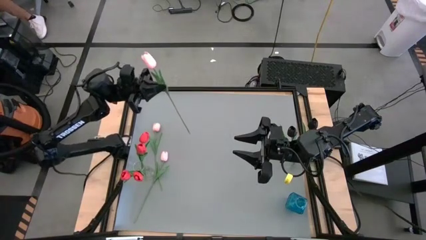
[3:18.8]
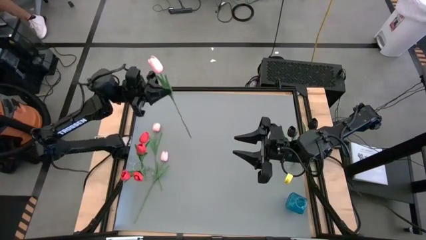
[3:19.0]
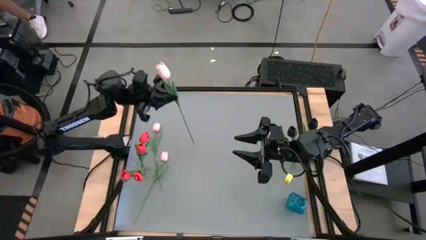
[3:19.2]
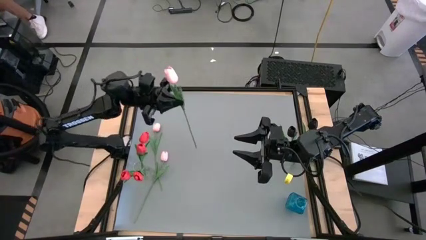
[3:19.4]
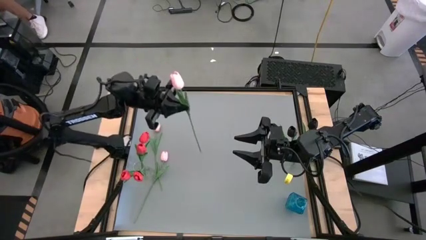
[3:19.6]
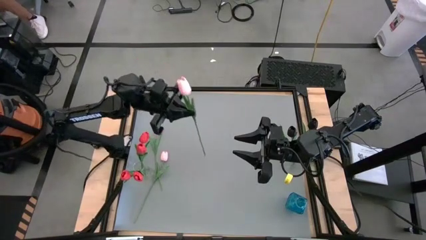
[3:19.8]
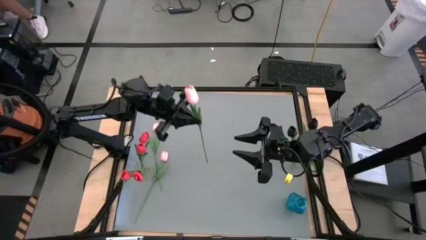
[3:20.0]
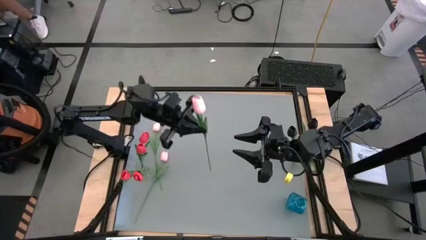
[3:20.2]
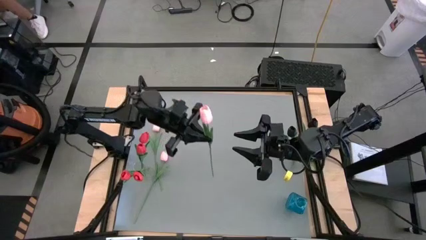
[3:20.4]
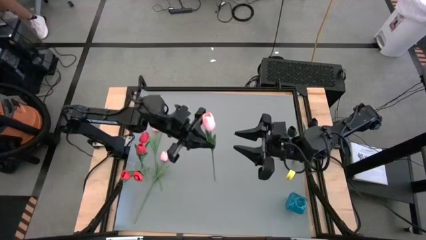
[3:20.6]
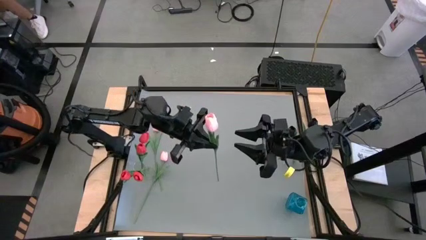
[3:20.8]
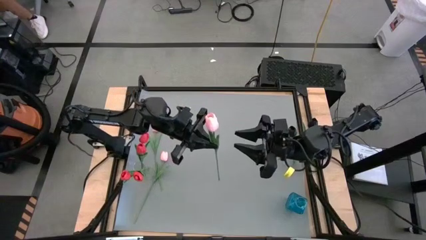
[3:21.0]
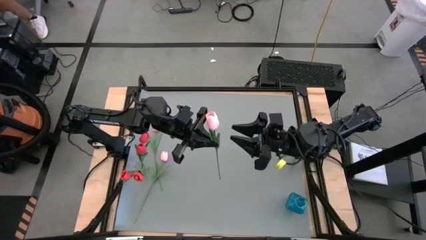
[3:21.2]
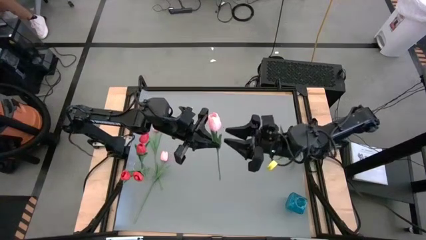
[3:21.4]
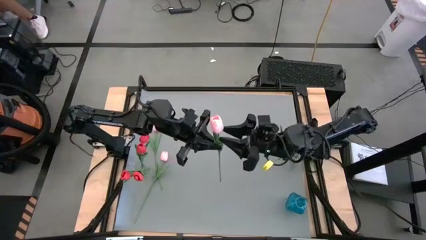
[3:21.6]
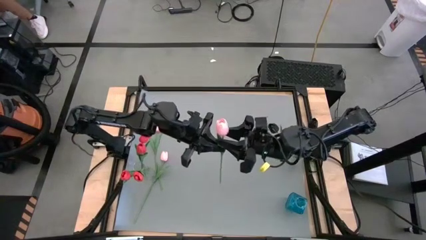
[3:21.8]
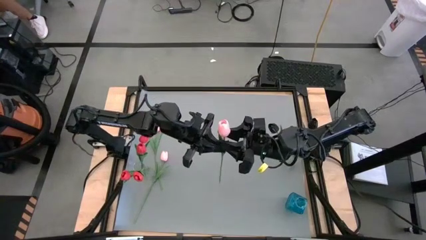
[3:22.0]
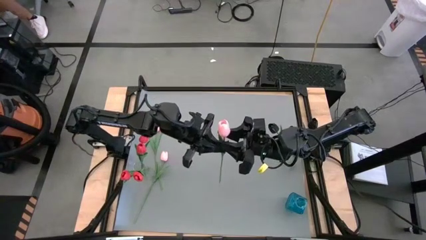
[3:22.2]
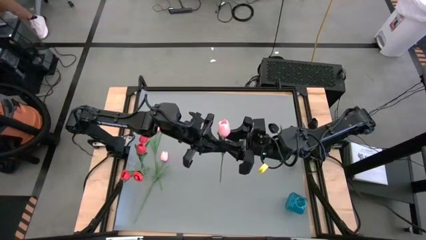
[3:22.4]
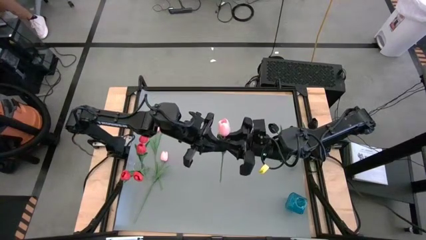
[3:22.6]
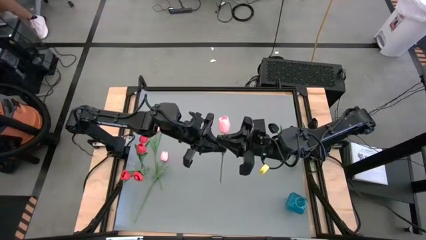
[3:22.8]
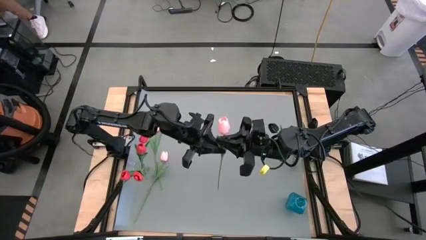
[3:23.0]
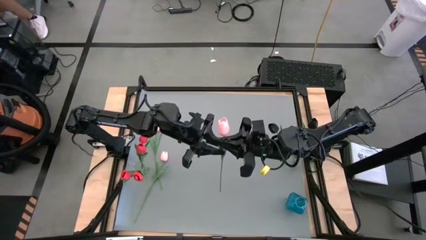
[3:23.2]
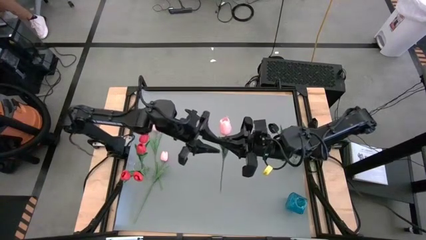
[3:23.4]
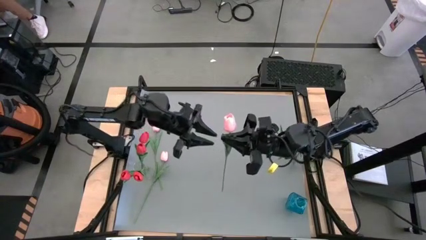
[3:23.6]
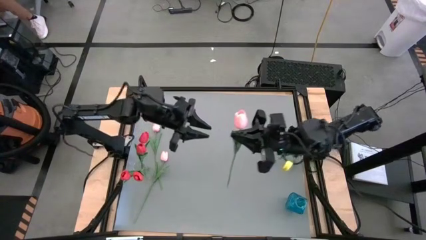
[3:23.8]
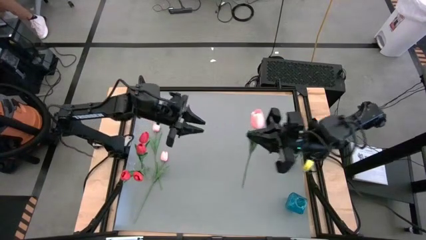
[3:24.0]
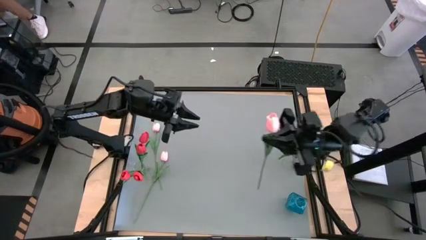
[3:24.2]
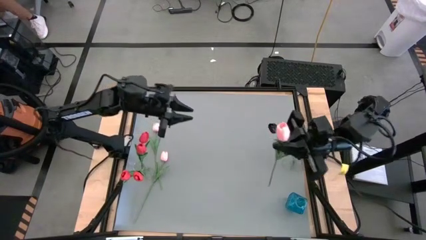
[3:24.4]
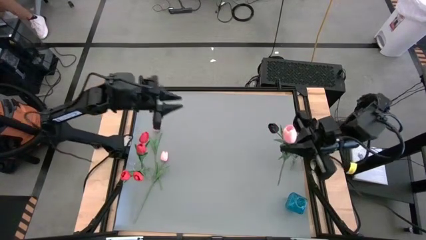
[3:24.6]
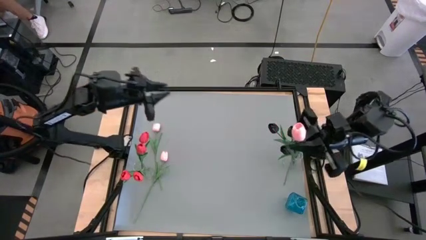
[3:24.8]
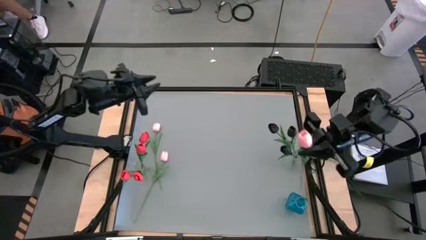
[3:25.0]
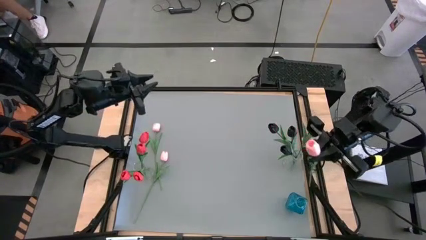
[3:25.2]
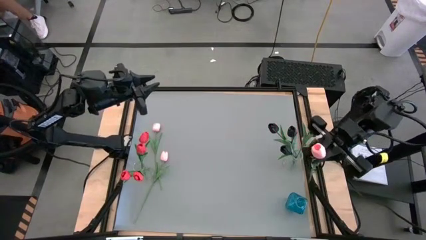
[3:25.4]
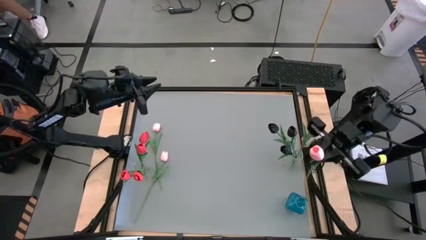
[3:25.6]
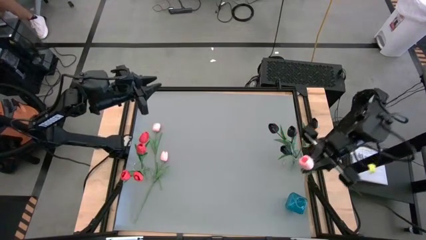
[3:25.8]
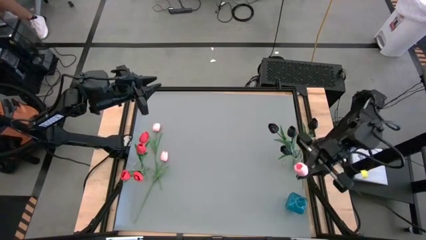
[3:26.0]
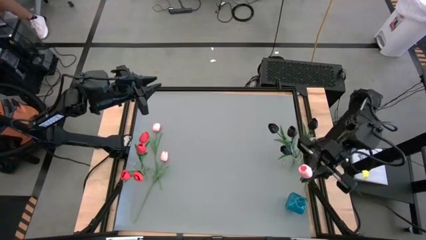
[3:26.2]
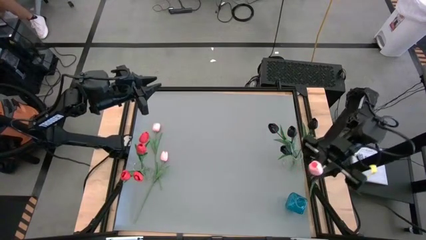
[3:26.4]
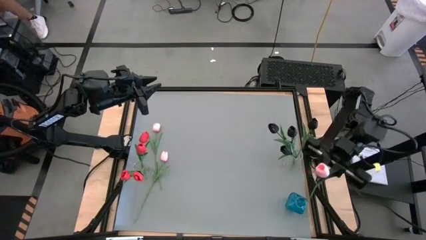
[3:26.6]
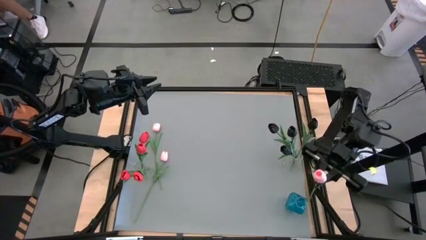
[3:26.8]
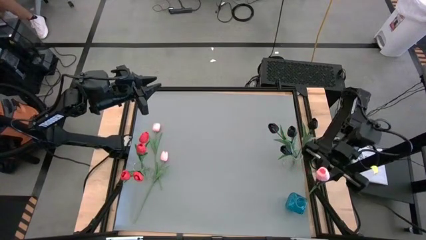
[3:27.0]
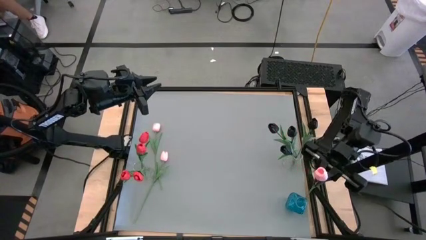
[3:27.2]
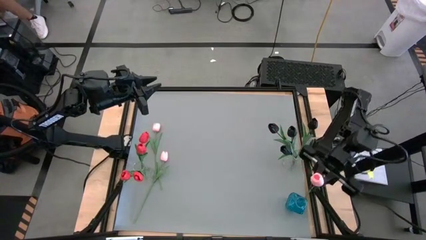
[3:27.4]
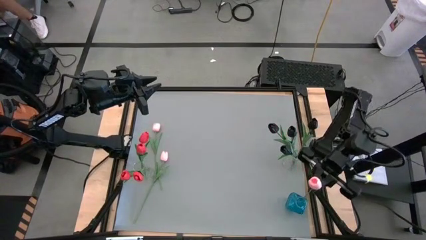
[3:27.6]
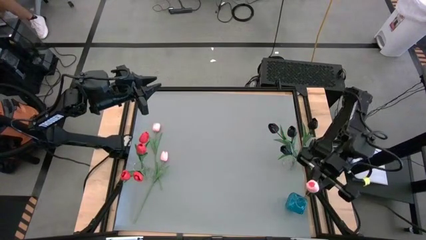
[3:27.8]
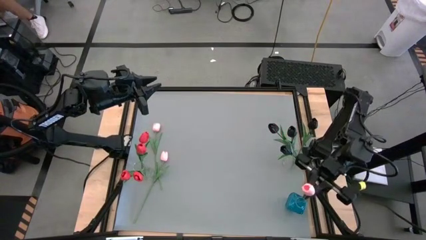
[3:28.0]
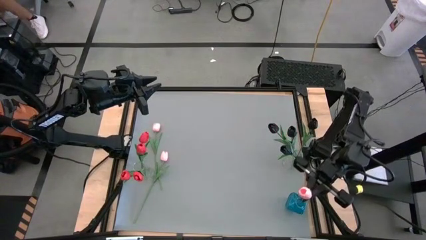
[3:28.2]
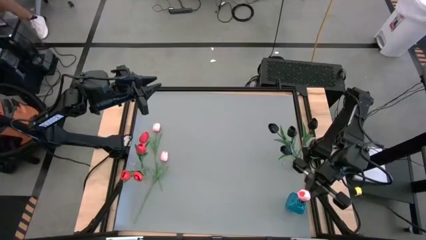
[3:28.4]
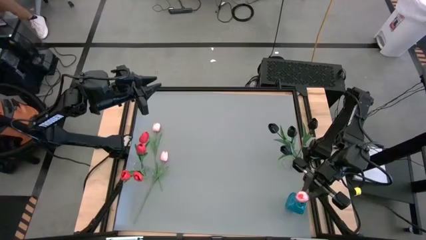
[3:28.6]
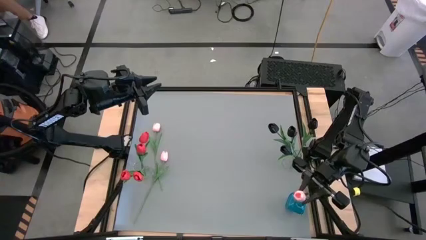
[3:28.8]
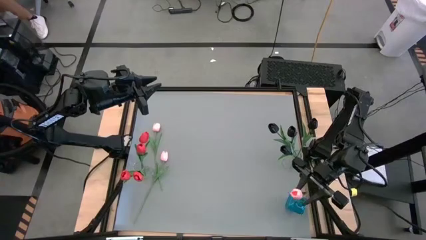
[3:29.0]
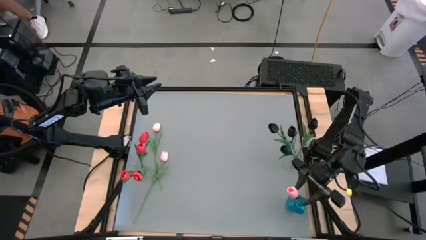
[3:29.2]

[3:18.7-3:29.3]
Task: Sort flowers into vase by color
Put the top pink tulip into the blue vase

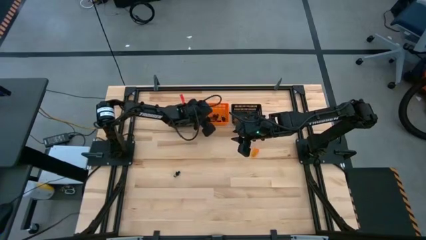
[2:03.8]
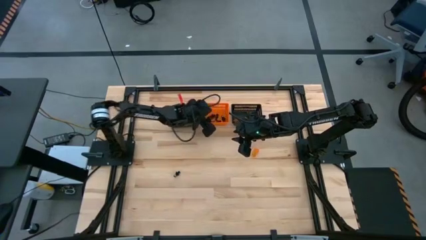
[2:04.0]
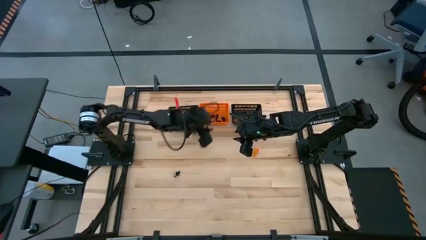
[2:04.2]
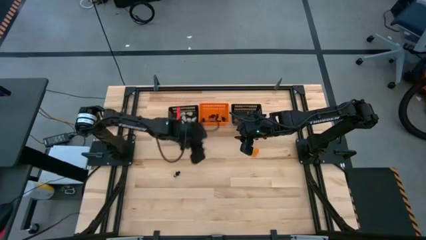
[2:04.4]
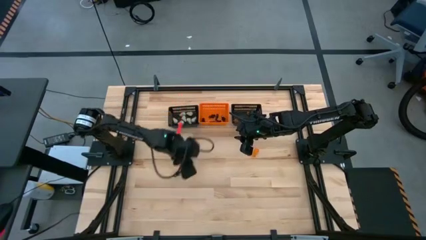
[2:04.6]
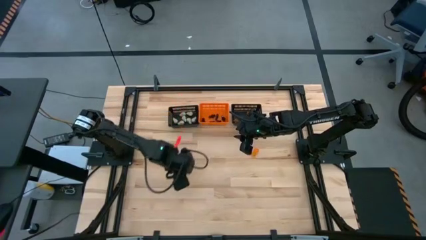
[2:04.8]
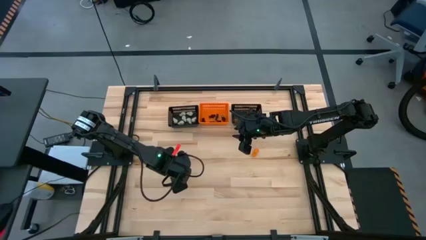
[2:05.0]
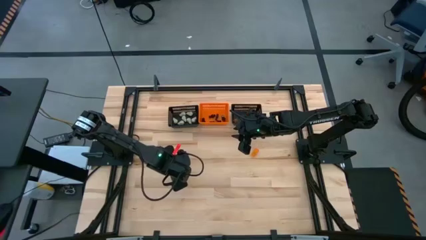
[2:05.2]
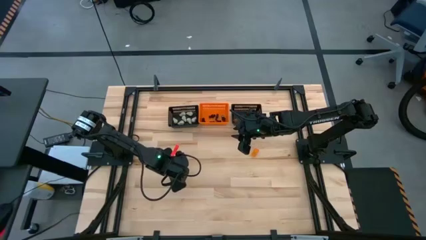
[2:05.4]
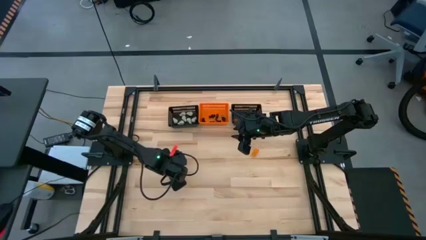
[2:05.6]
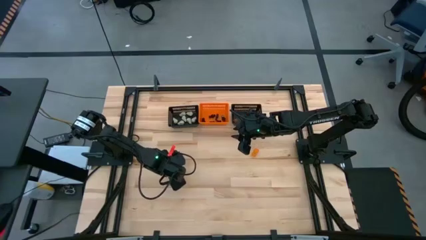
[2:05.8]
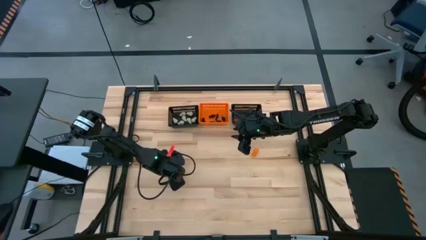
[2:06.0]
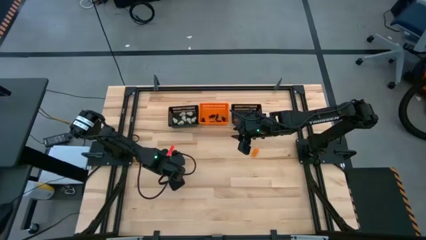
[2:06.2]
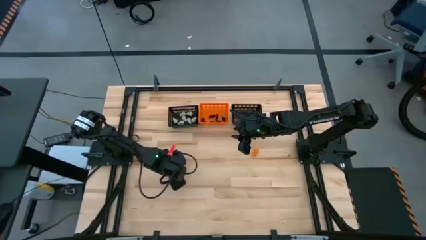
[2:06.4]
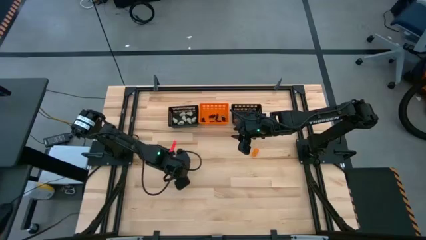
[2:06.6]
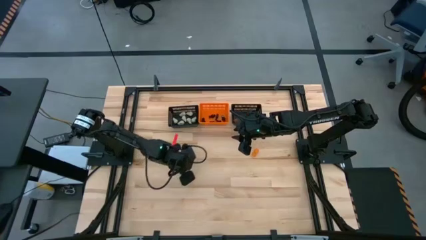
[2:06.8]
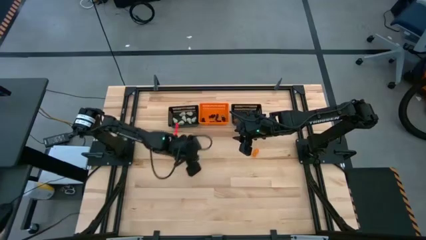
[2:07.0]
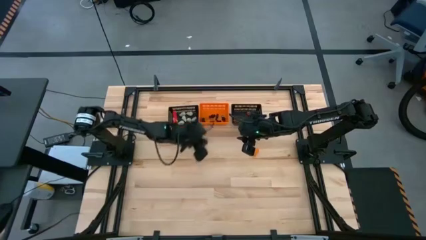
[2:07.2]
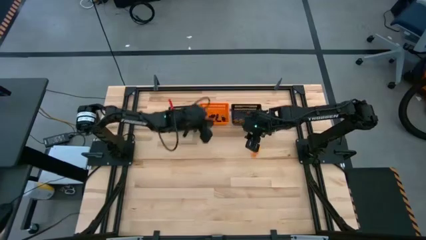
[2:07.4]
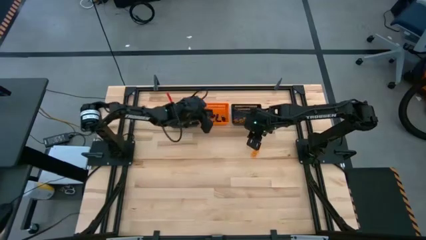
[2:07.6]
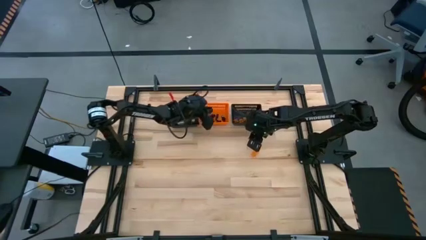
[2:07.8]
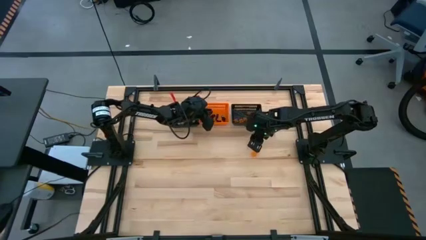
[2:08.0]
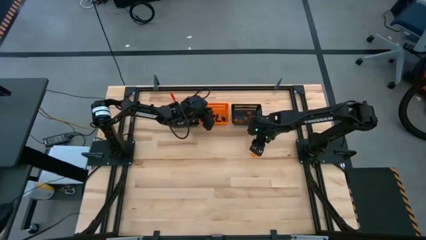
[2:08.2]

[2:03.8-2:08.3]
Task: Sort Halloween decoration
Put the black skeleton toy into the orange bin

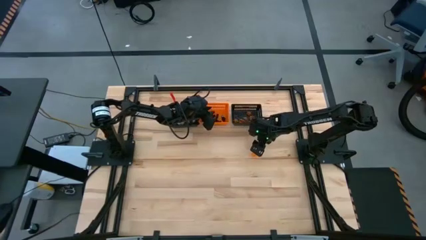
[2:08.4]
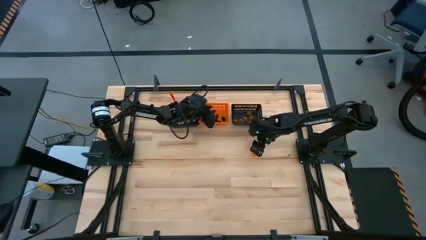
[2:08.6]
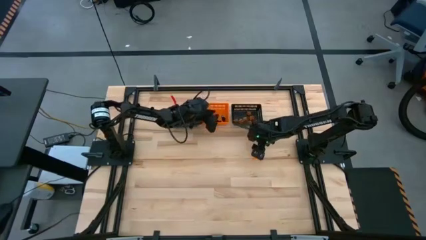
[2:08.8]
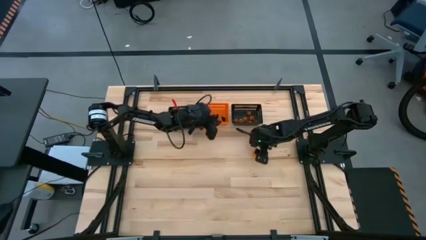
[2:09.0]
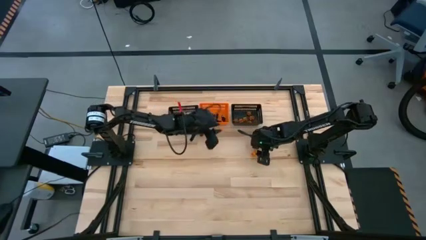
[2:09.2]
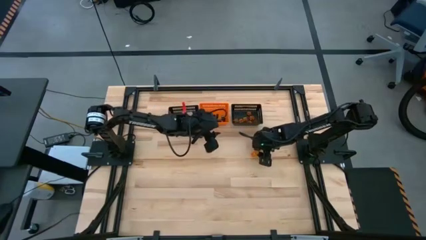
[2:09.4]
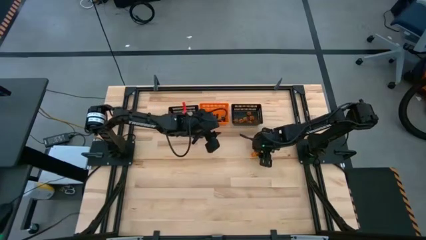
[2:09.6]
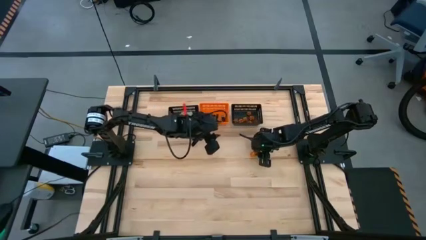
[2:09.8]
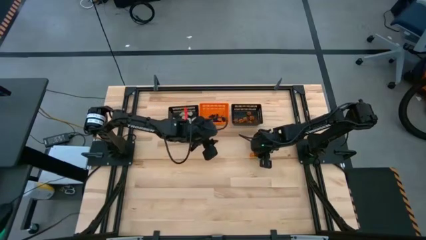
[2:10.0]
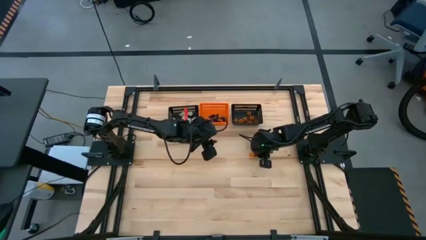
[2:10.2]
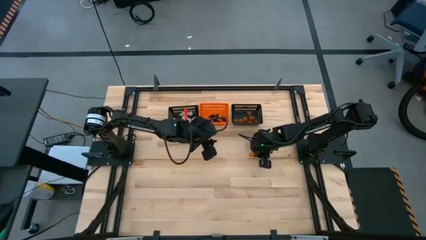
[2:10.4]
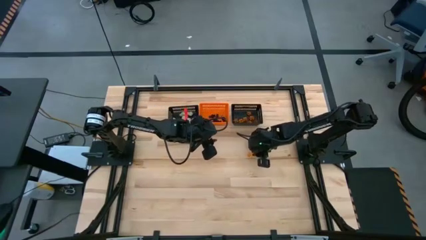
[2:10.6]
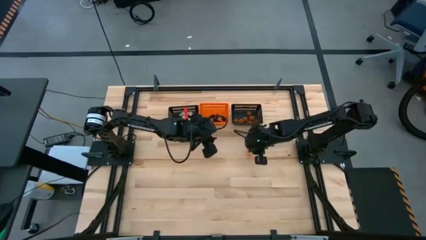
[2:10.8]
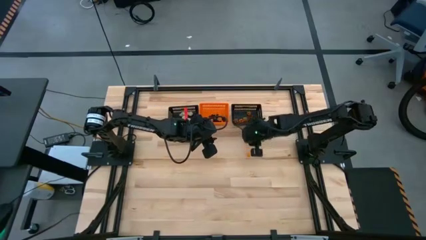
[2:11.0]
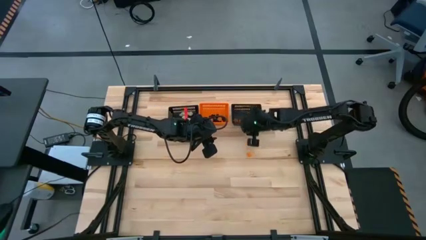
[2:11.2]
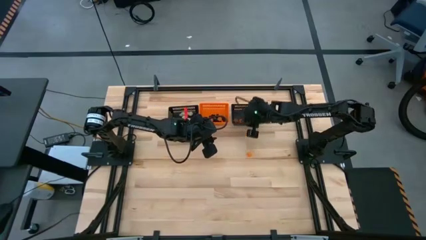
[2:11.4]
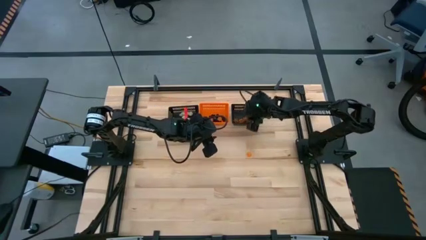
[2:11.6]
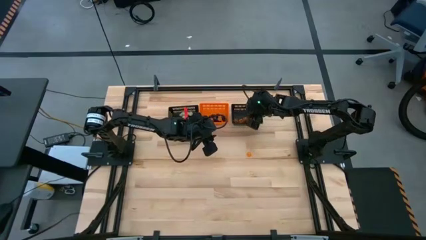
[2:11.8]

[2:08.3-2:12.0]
Put the orange pumpkin toy into the right black bin
